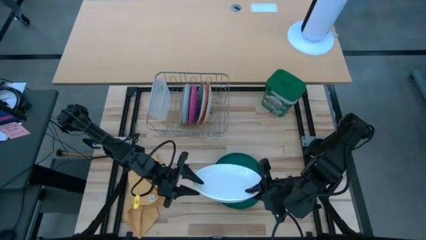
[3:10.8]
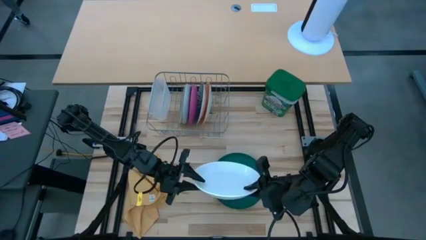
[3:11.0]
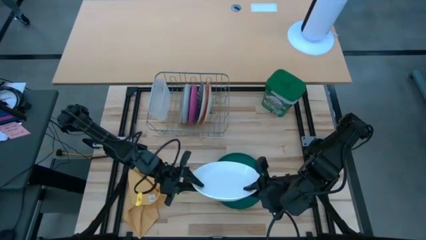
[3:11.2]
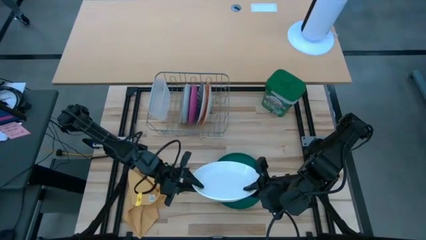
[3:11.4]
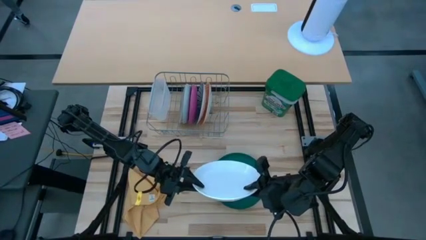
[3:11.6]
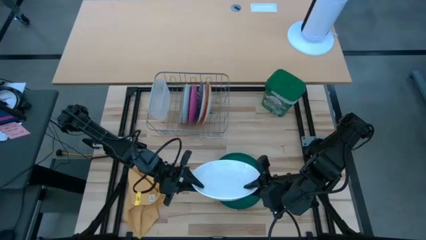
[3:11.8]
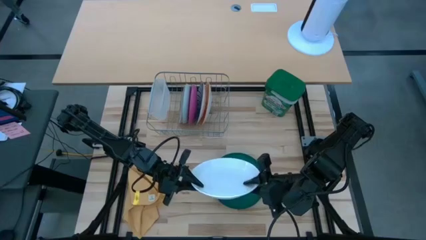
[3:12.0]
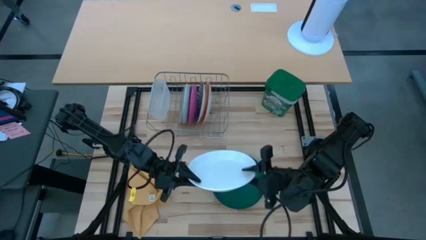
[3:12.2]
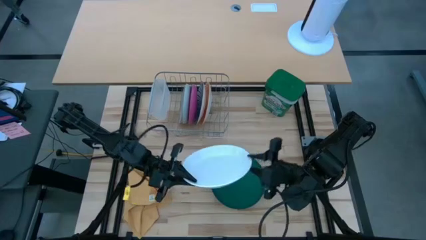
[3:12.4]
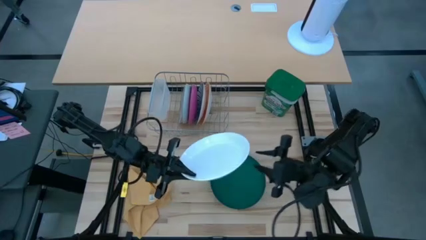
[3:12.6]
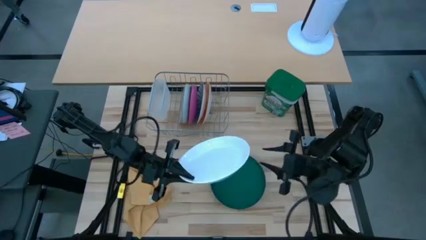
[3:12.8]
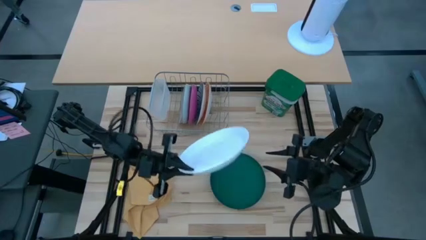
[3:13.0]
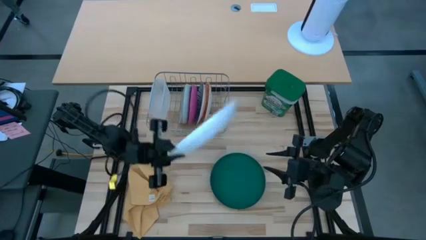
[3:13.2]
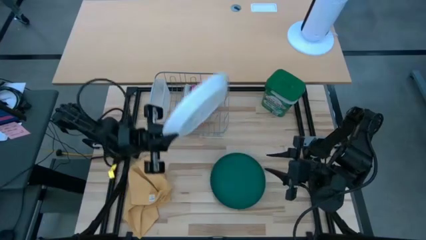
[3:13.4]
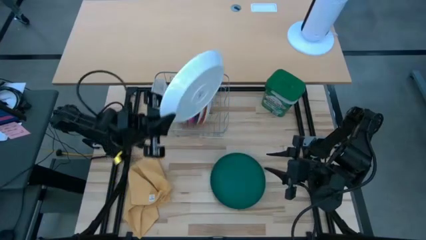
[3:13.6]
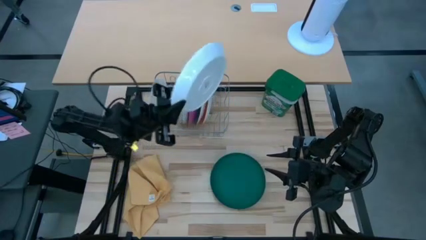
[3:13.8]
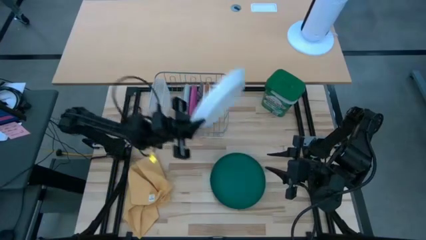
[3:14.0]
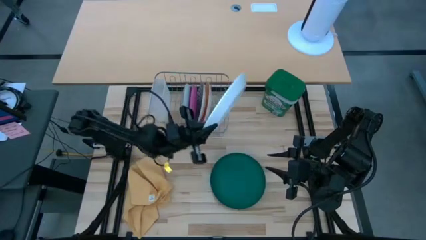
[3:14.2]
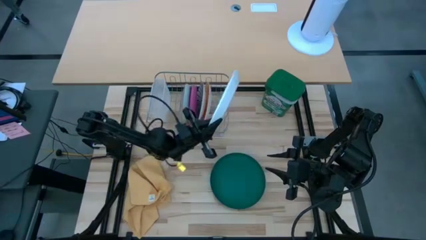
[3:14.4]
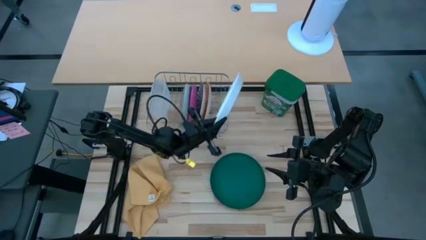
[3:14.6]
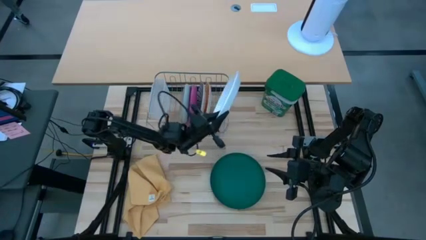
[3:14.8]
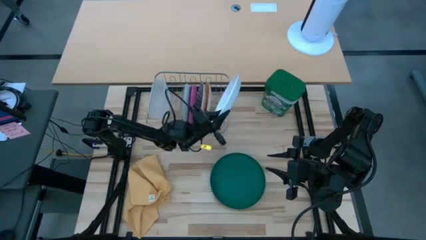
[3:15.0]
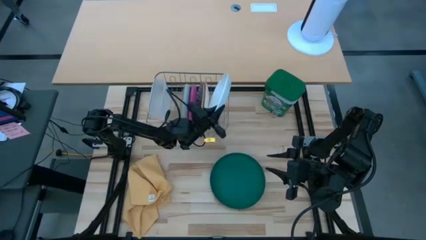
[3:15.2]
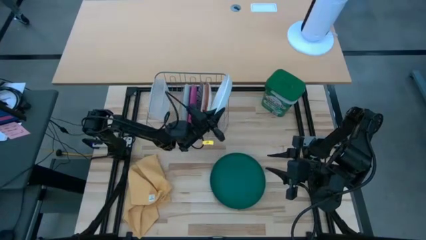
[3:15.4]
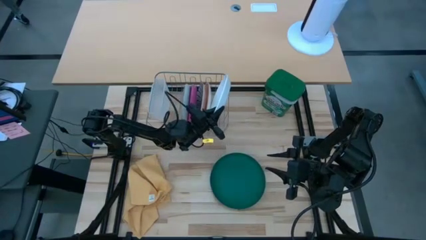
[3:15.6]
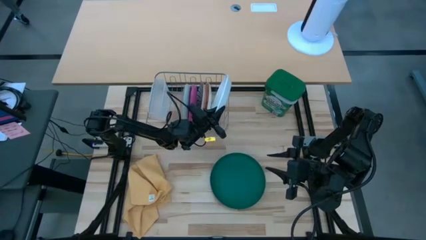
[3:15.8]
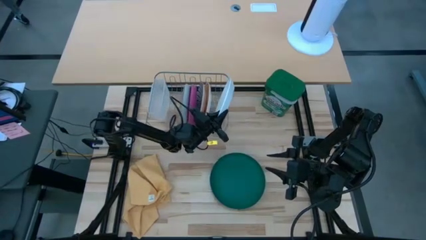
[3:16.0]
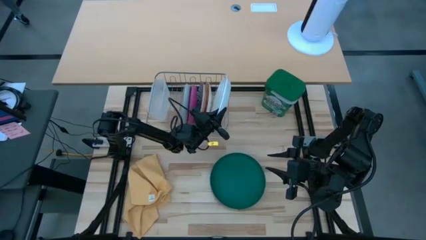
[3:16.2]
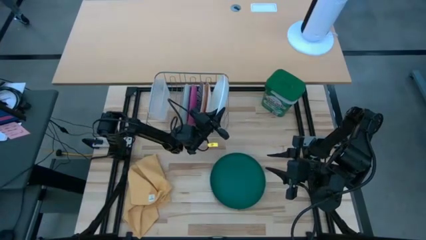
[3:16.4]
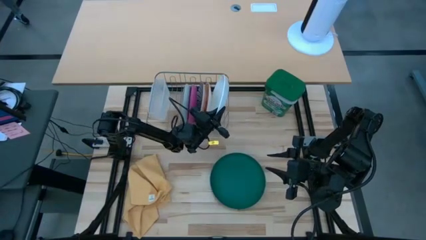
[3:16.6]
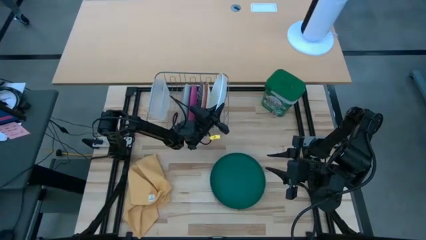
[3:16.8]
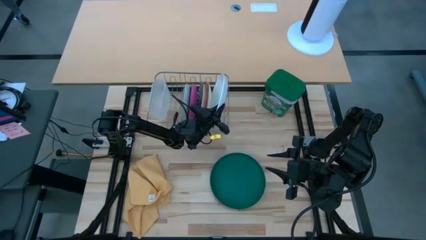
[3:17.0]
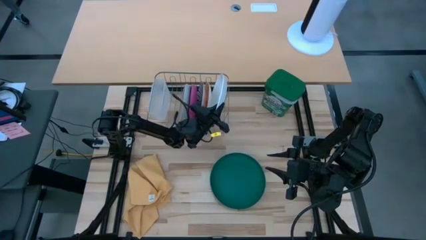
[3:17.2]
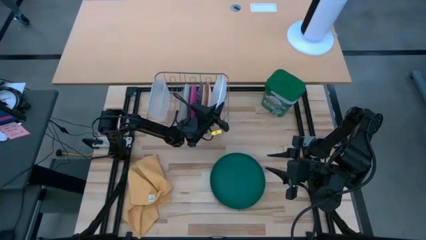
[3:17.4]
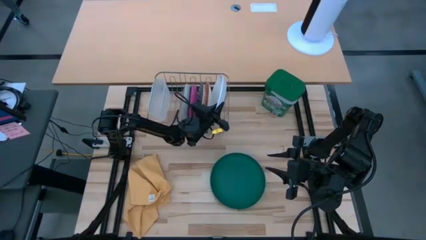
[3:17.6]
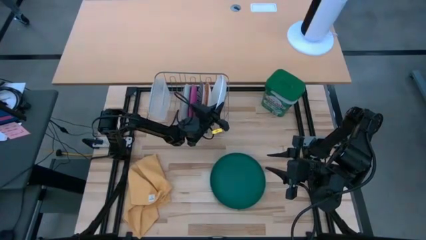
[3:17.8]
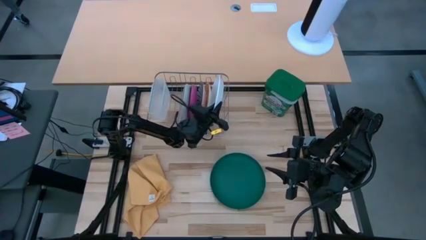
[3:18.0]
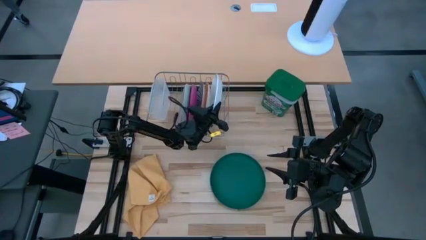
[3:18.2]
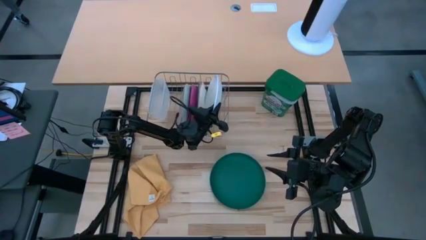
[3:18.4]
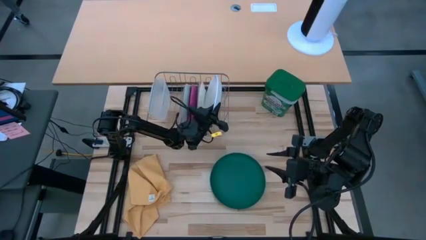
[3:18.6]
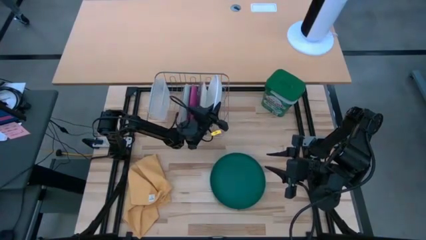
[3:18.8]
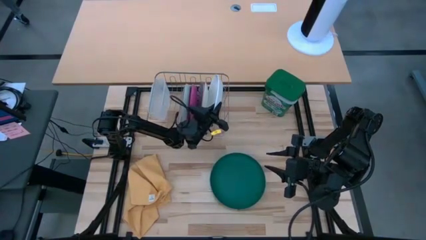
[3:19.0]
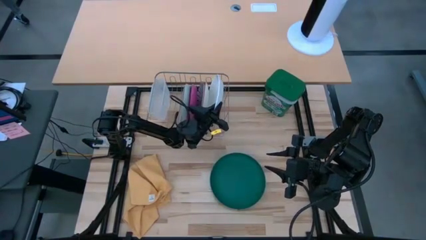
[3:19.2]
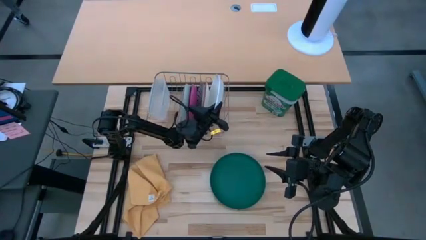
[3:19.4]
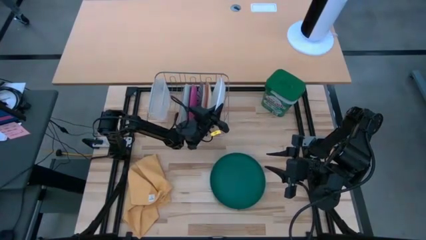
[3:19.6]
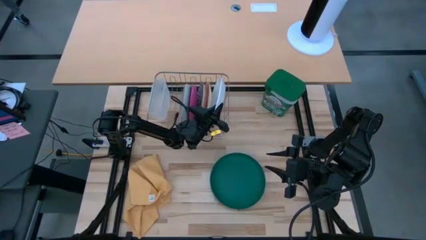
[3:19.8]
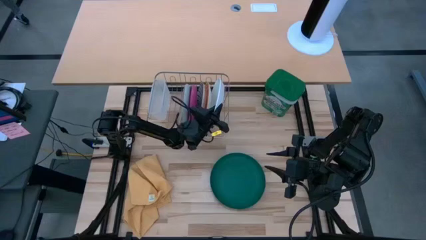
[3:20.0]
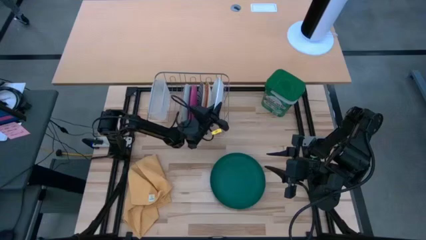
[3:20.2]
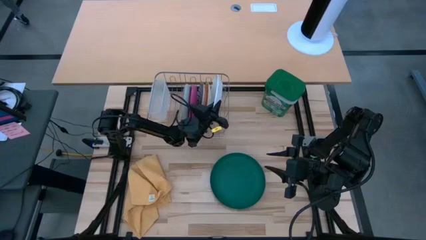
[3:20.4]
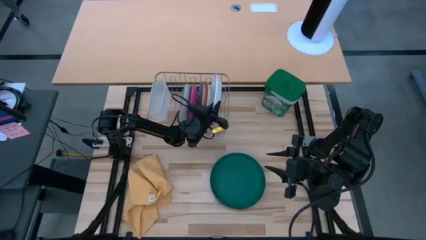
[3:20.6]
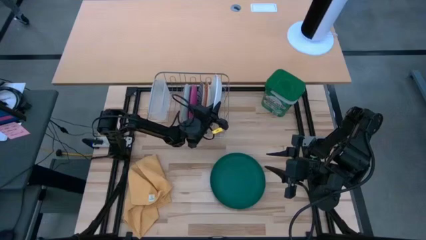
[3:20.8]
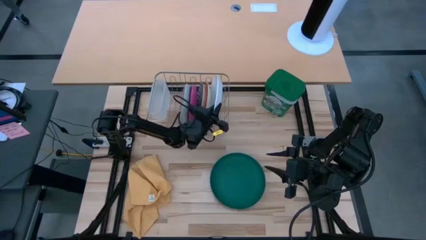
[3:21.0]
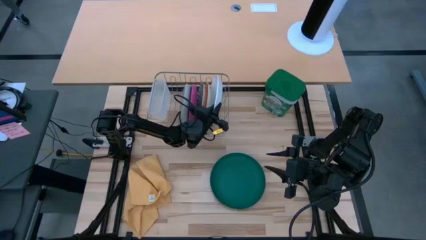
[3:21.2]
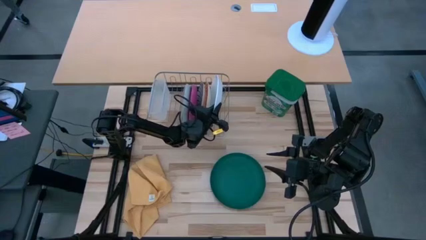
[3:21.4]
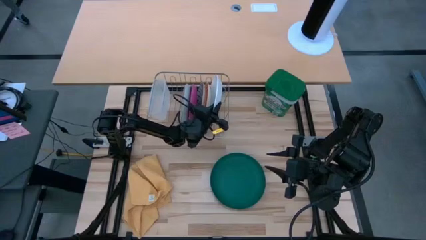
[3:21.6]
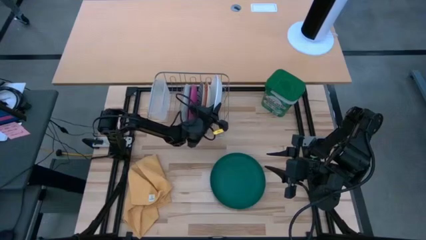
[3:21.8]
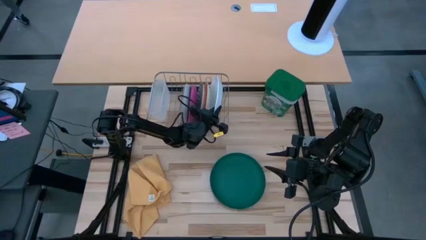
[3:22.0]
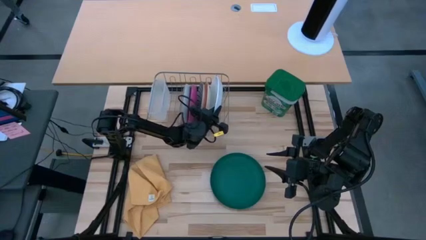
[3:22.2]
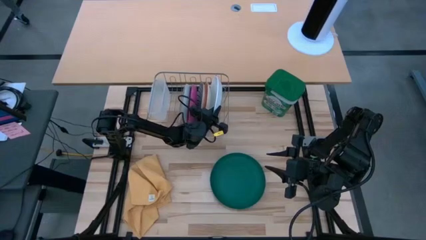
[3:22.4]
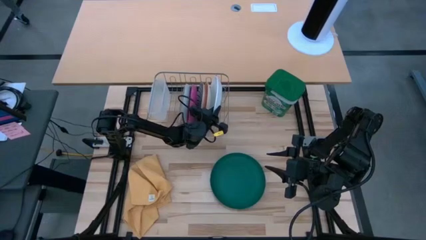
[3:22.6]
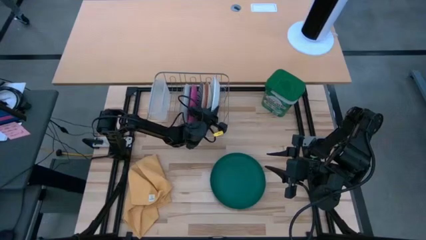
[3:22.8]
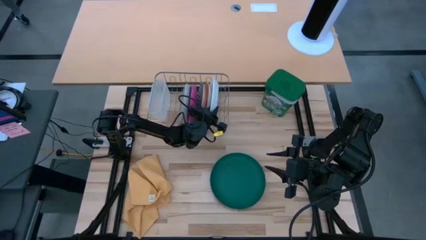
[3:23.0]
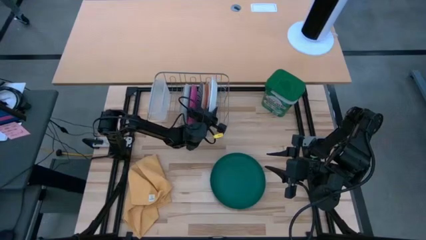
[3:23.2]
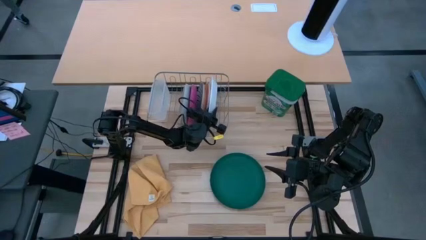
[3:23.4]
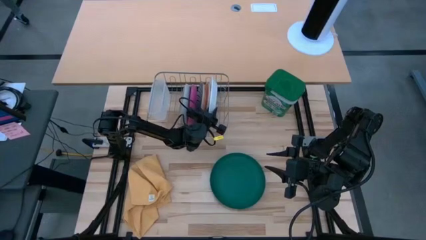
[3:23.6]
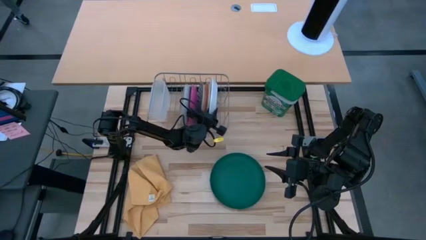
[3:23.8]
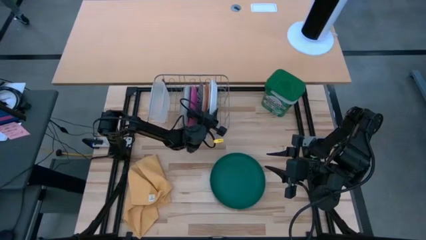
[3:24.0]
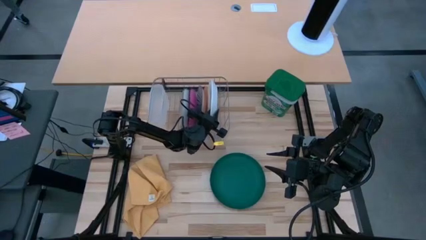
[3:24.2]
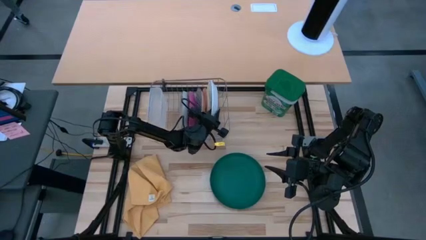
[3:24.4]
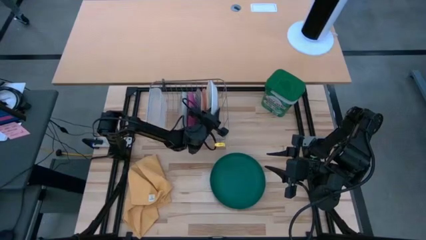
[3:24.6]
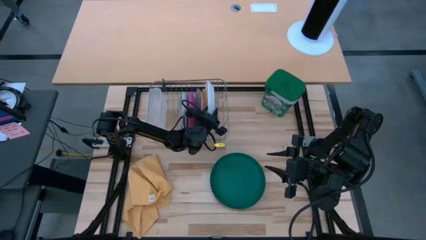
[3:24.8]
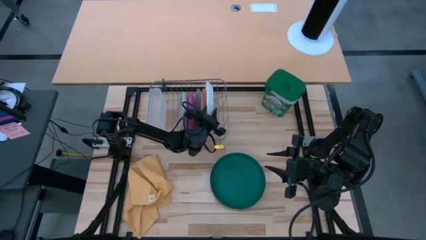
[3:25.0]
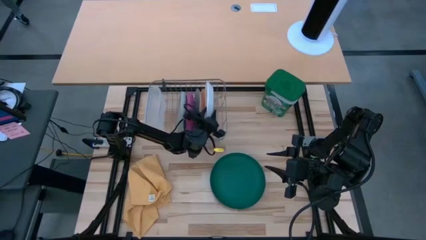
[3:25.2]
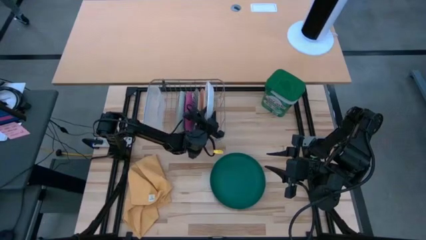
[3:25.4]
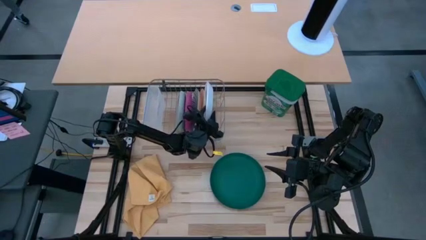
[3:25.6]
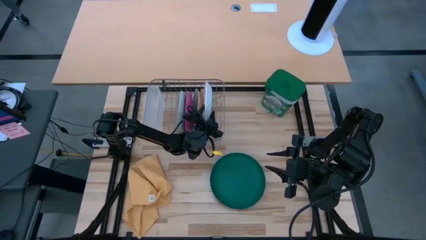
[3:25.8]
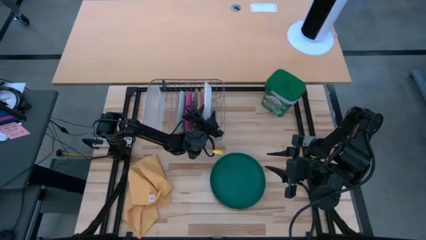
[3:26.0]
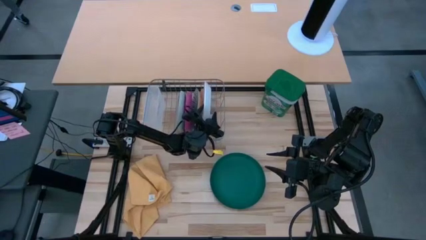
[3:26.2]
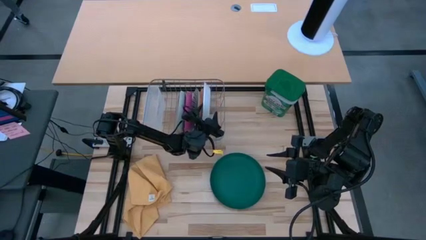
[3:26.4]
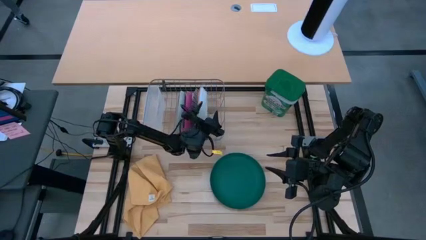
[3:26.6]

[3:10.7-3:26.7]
Task: Sort dishes
Put the white plate into the dish rack
